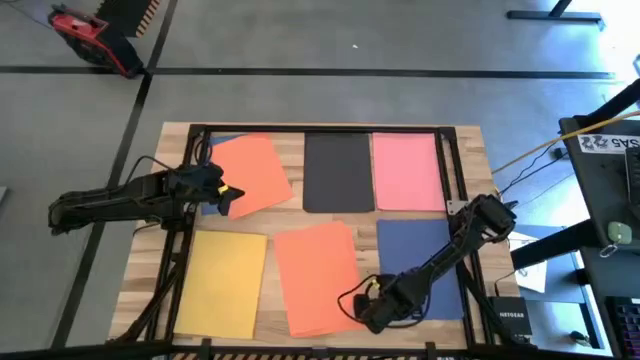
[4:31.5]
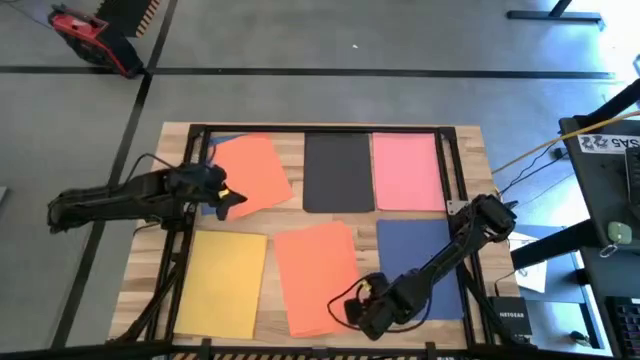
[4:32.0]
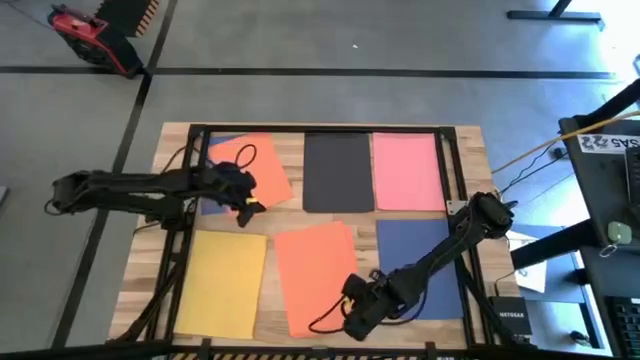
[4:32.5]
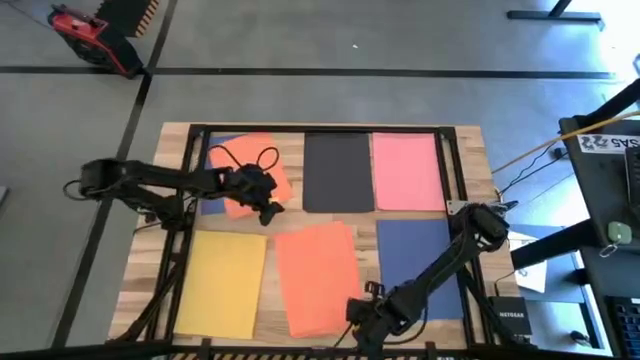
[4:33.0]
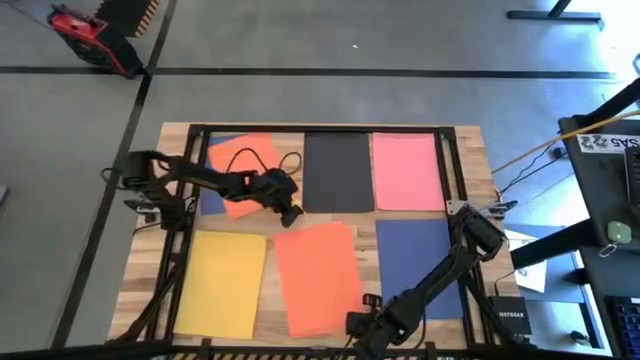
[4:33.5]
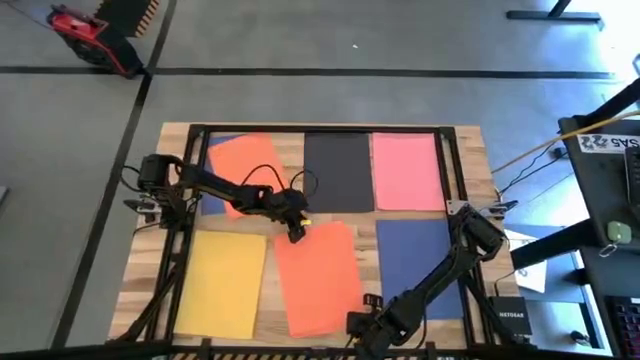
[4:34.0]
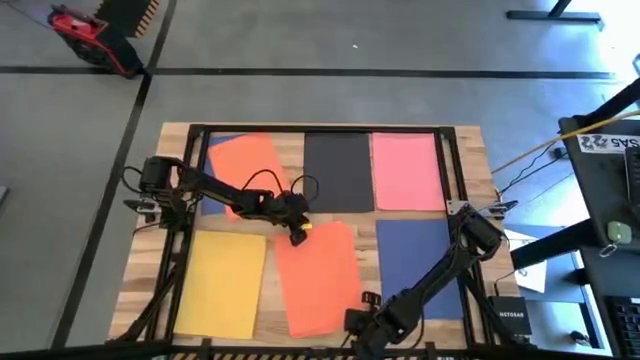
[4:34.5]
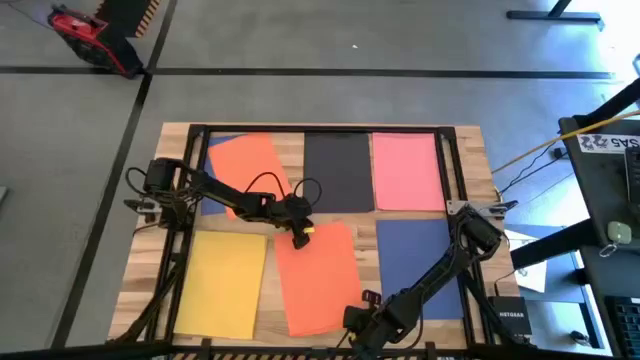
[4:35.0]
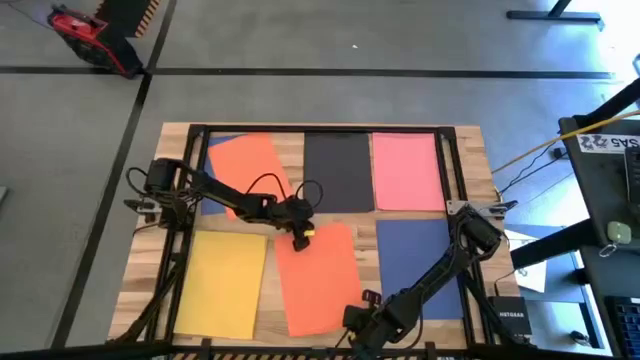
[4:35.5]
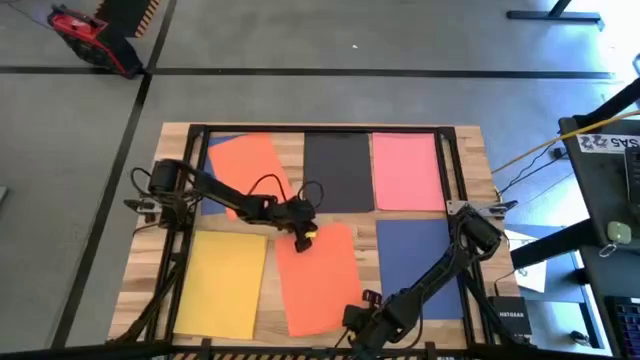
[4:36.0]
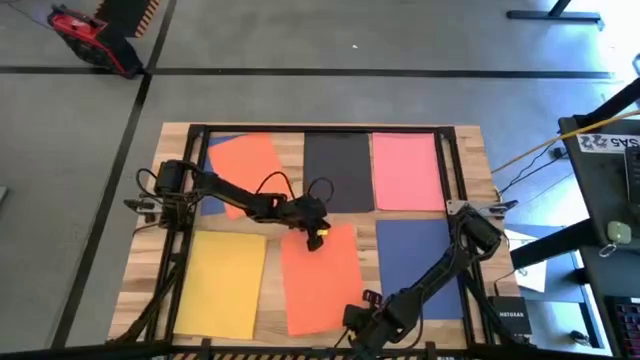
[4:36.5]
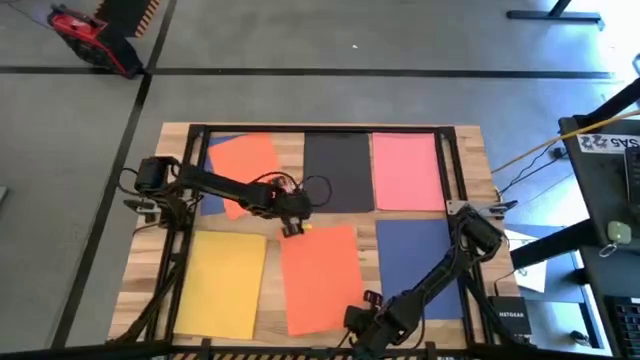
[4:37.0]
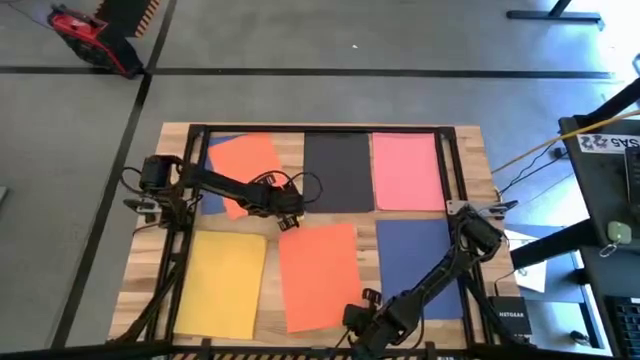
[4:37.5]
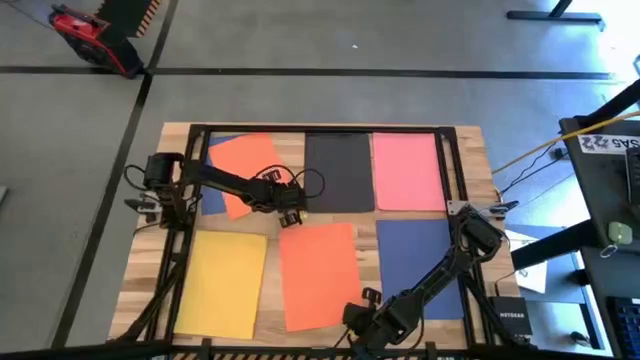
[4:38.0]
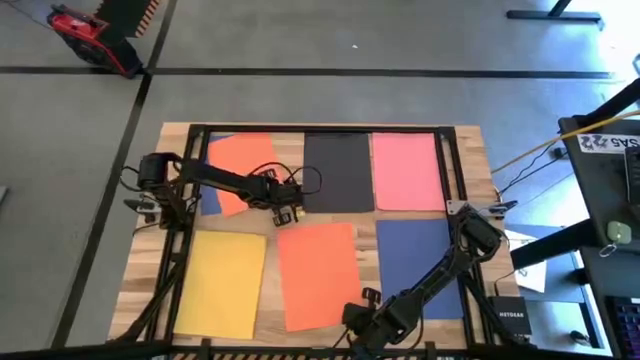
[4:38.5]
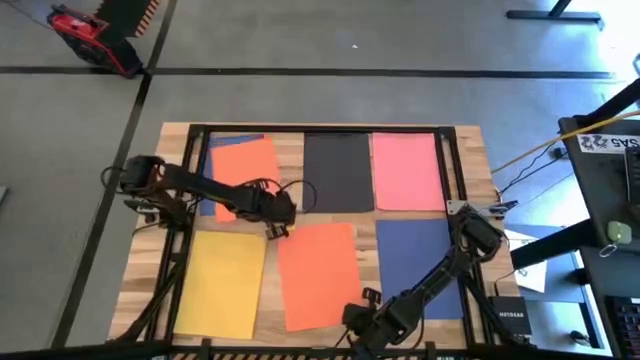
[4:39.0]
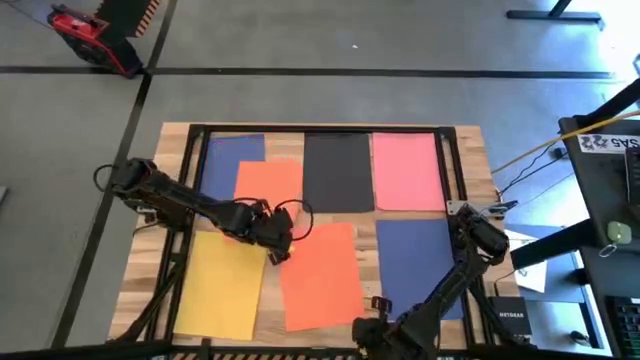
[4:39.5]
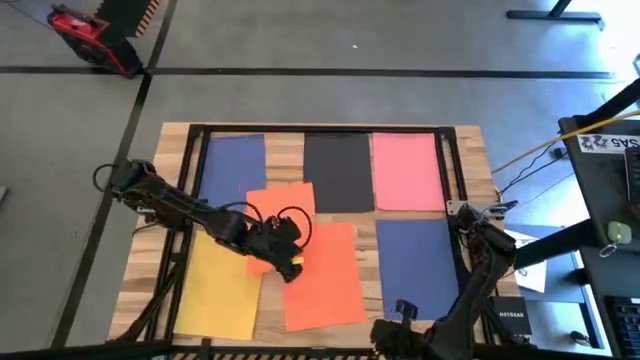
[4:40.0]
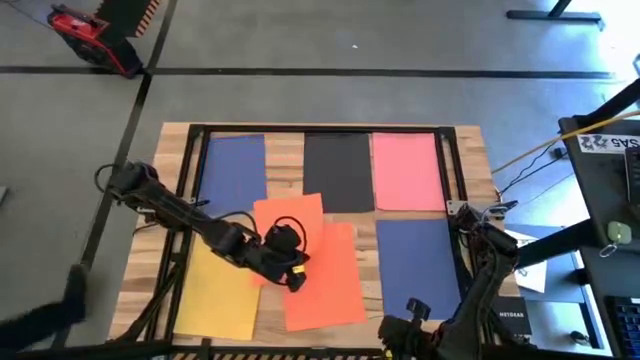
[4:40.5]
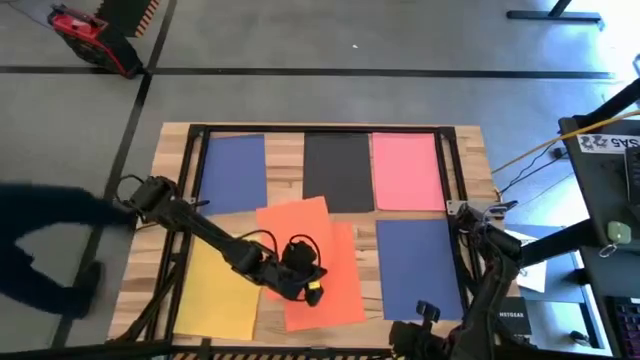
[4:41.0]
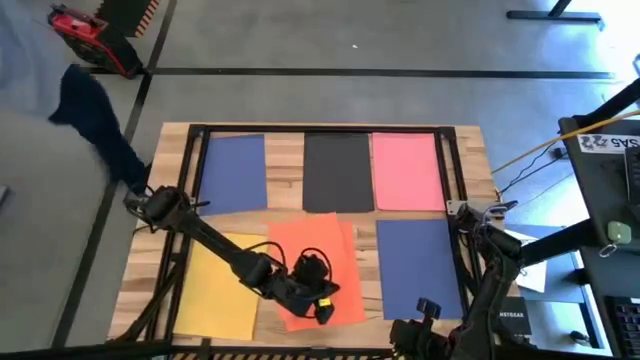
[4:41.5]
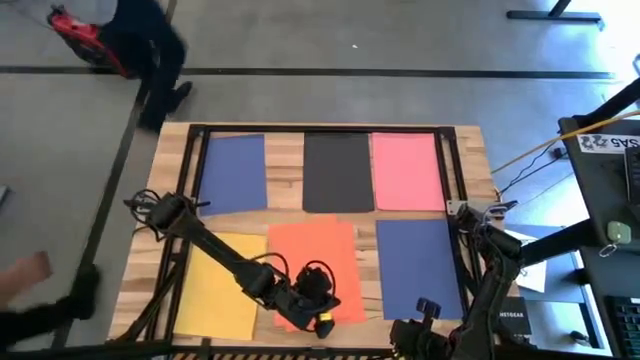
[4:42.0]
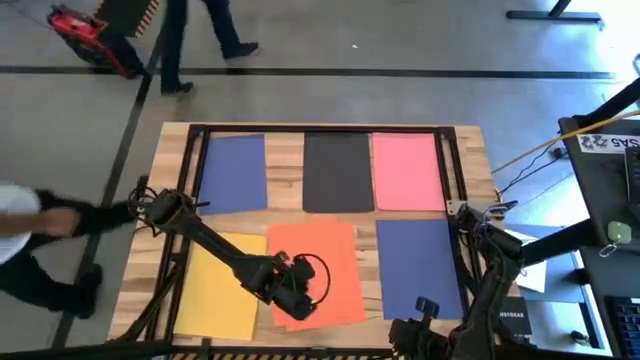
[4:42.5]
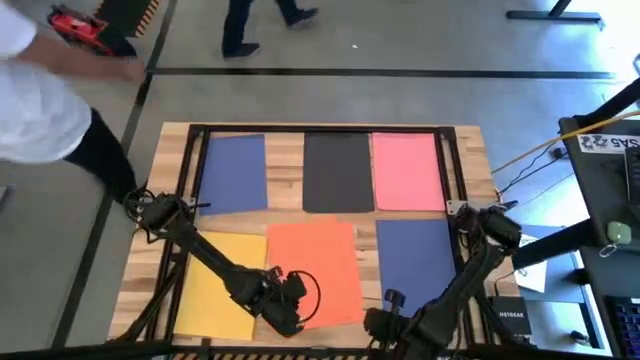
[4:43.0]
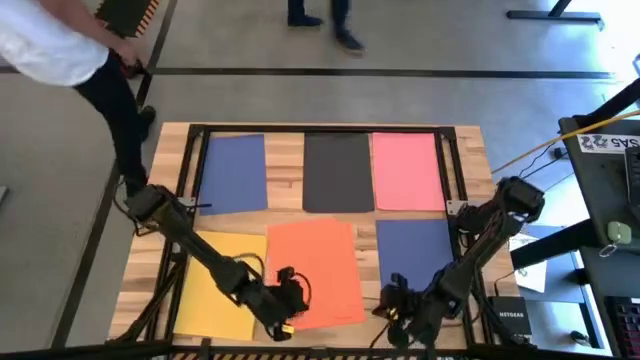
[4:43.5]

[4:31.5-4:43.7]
Task: Organize paper
Stack the orange paper on top of the stacked orange papers

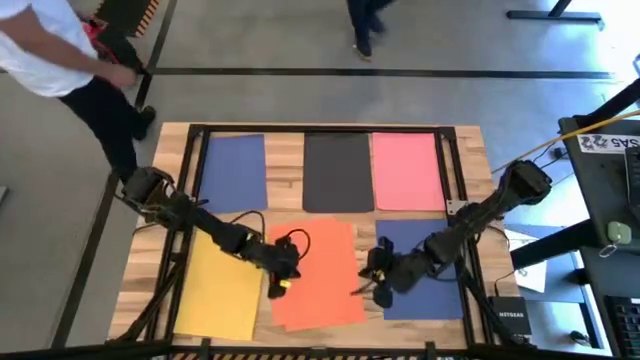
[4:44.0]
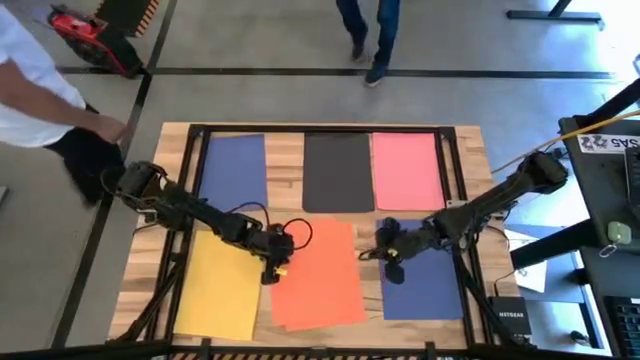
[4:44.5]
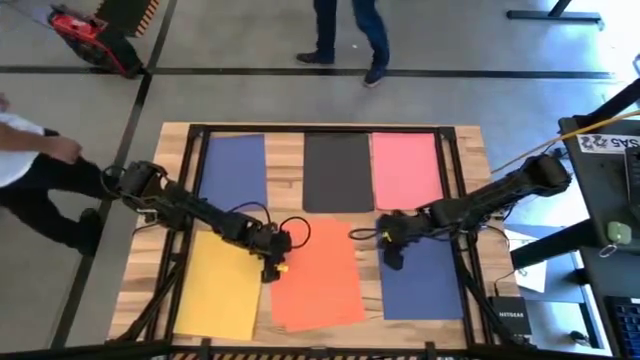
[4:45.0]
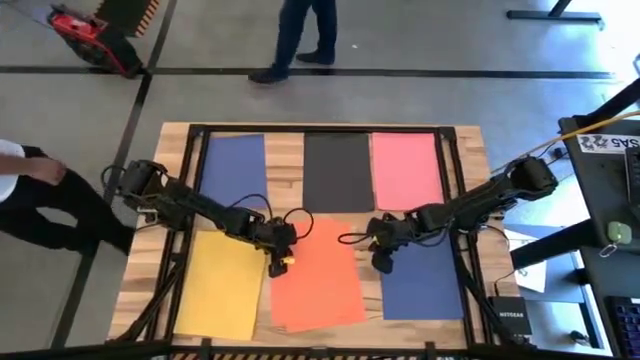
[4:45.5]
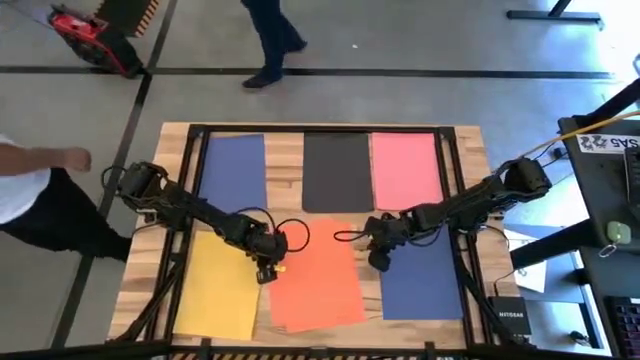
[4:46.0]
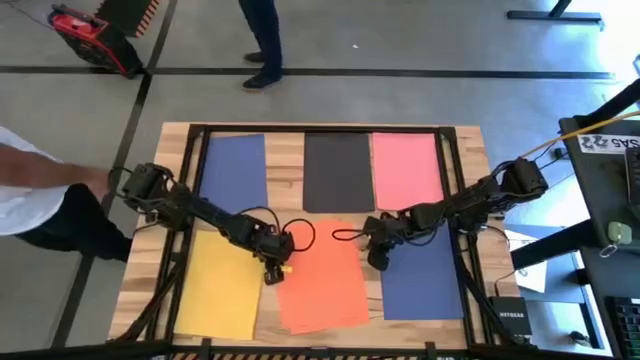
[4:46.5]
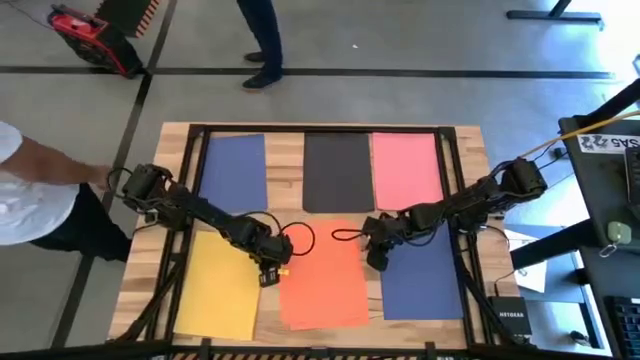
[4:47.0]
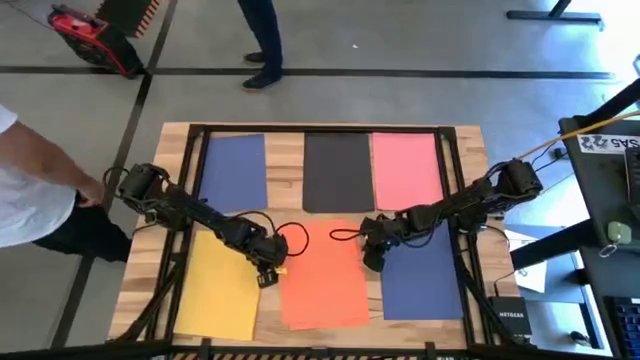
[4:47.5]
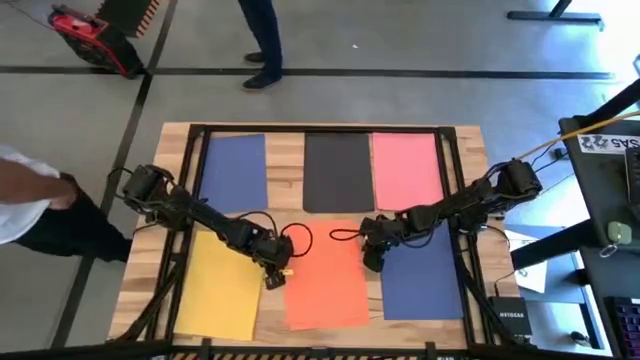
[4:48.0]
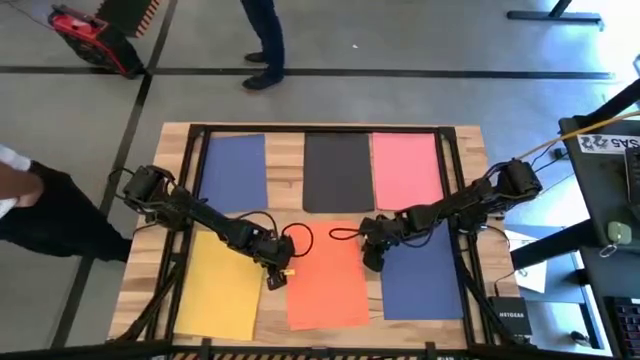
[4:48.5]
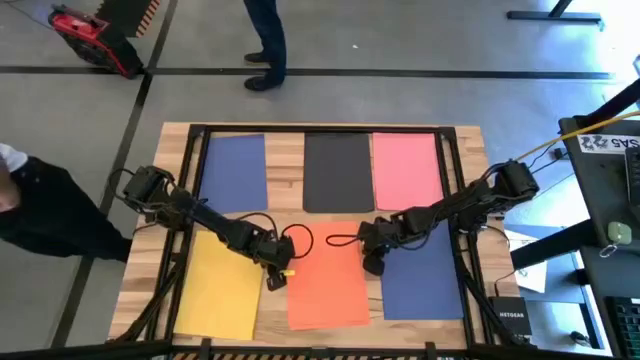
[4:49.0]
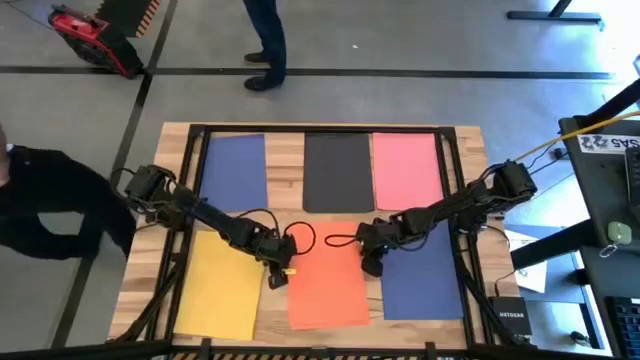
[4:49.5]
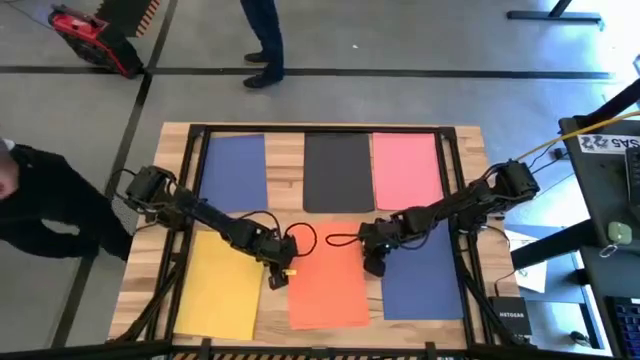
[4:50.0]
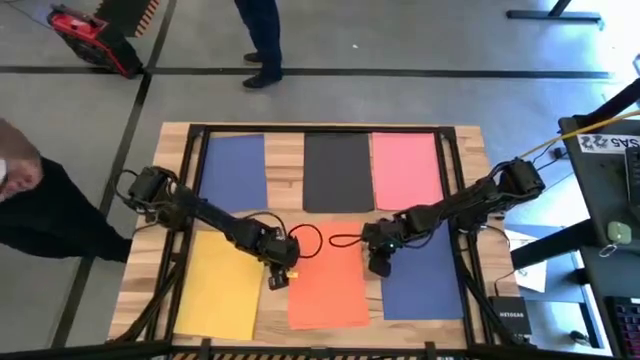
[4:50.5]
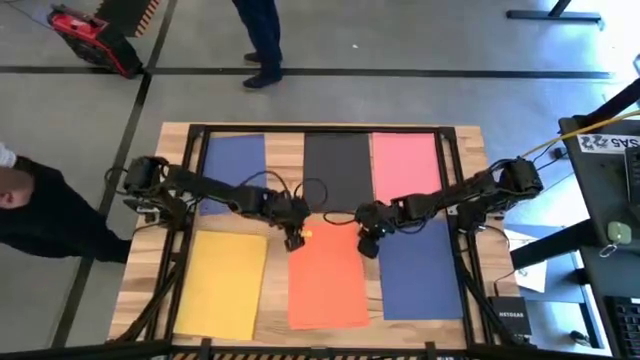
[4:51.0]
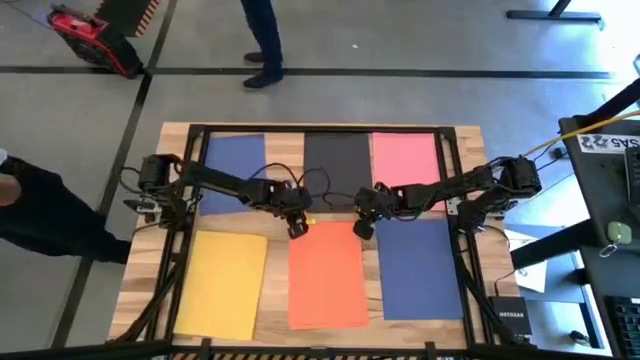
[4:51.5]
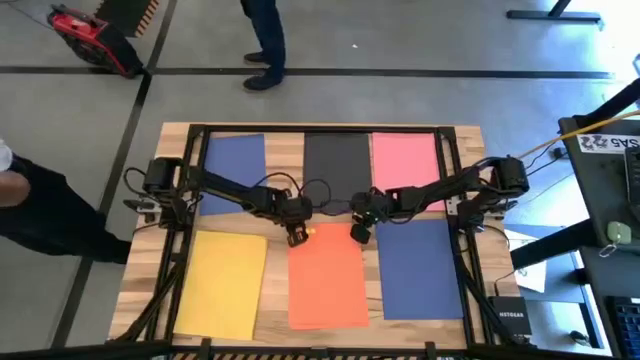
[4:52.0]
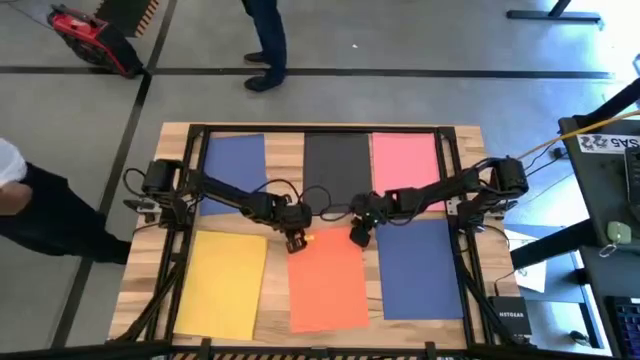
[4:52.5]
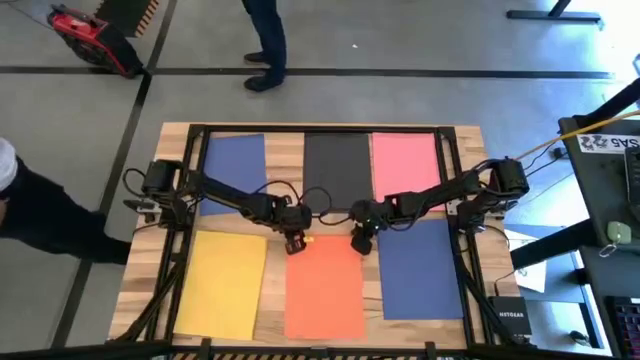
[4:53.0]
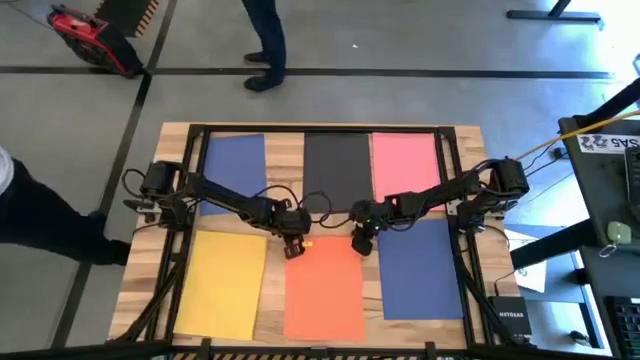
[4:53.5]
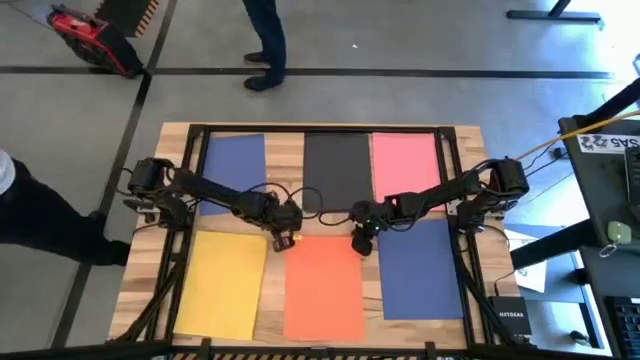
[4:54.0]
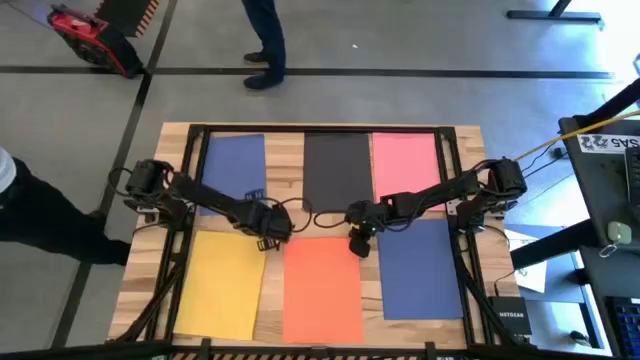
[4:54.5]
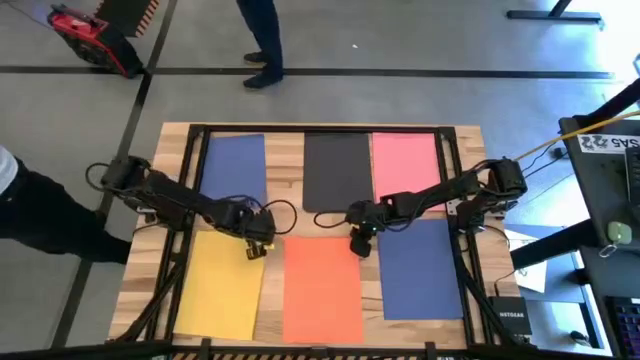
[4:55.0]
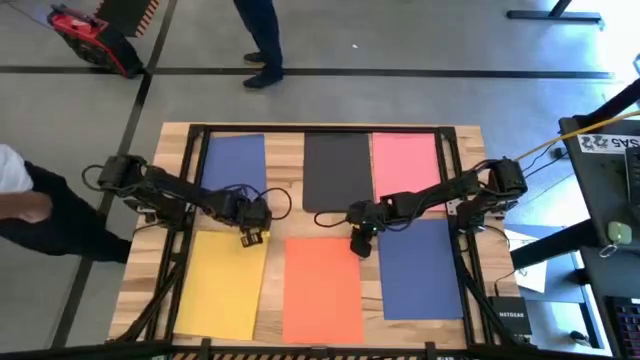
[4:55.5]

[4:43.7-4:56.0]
Stack the orange paper on top of the stacked orange papers
